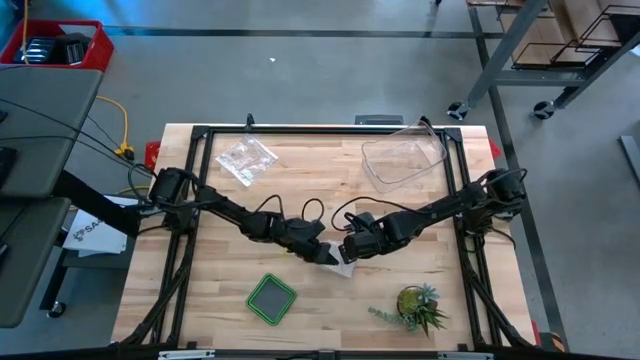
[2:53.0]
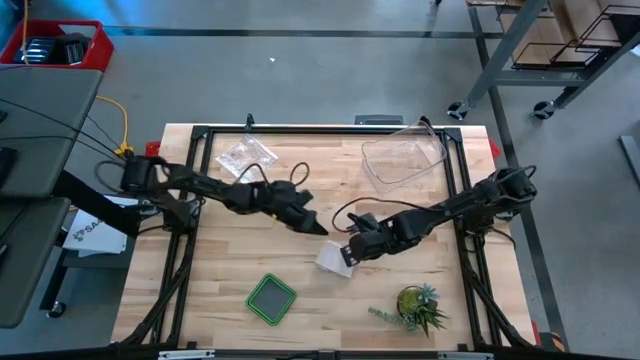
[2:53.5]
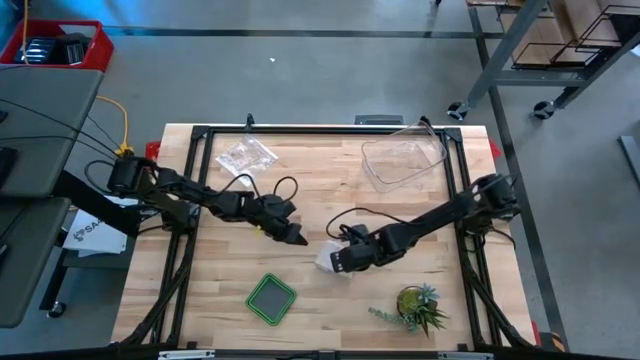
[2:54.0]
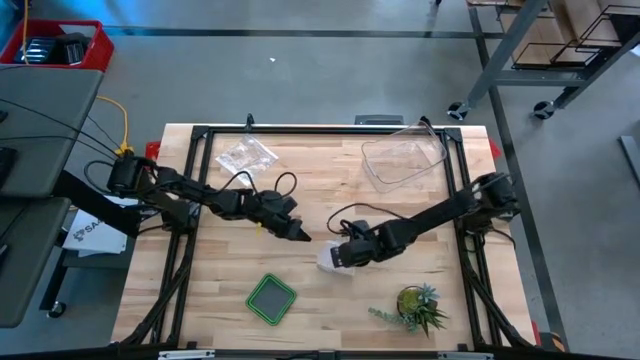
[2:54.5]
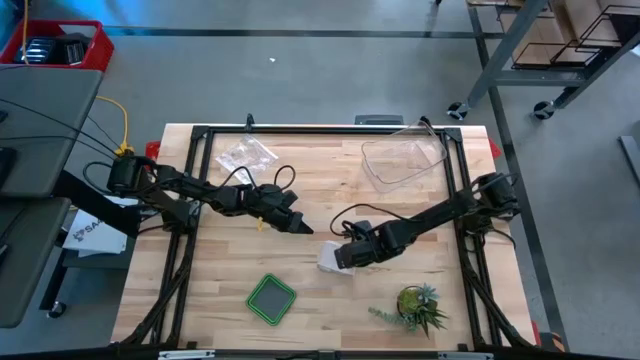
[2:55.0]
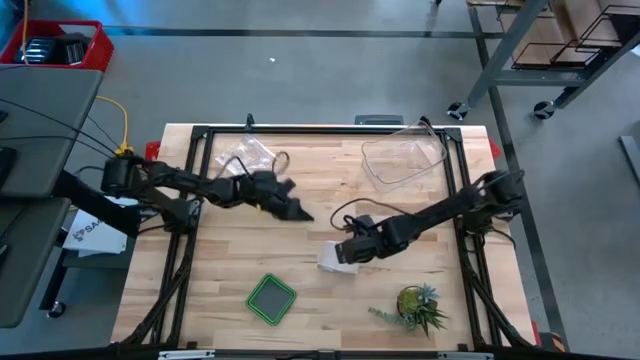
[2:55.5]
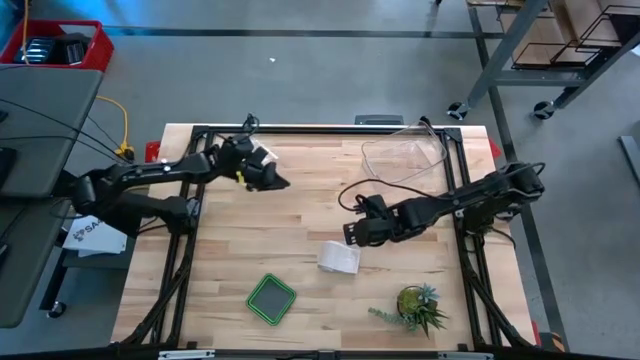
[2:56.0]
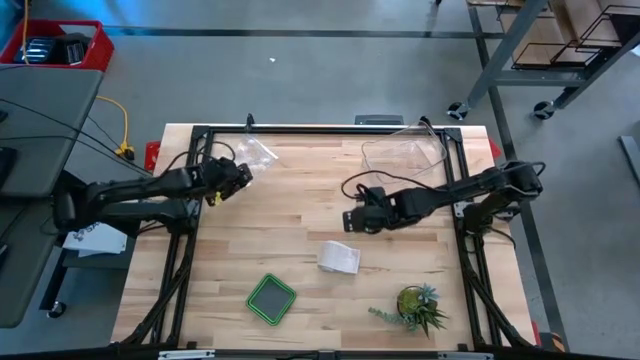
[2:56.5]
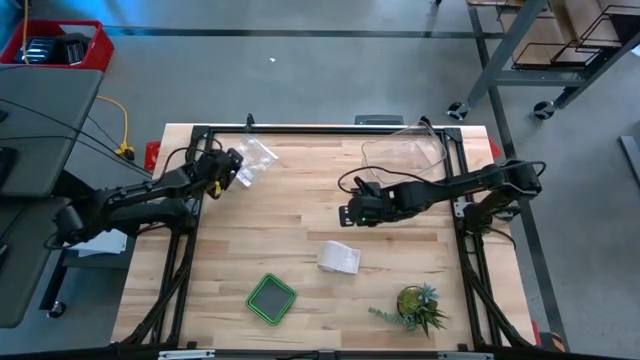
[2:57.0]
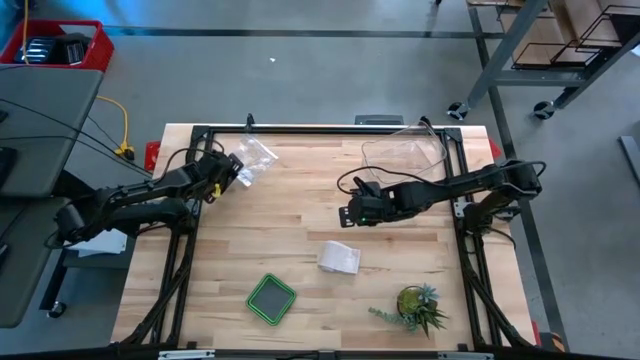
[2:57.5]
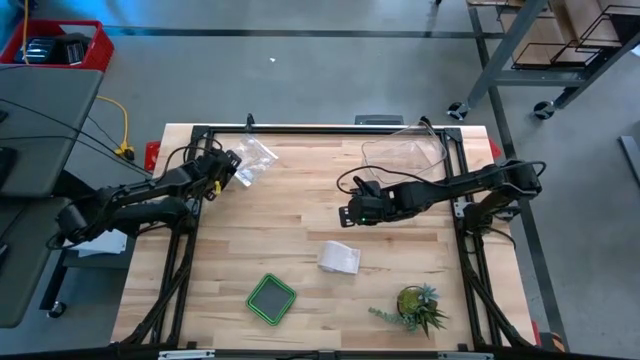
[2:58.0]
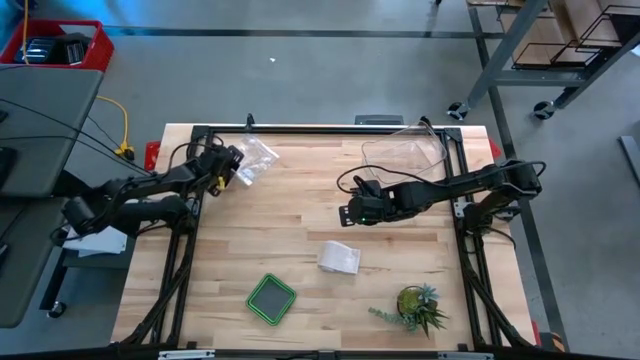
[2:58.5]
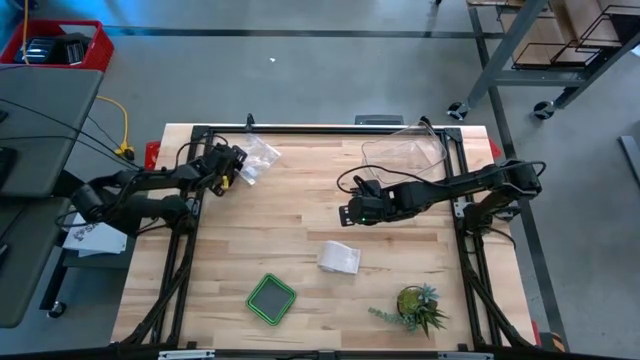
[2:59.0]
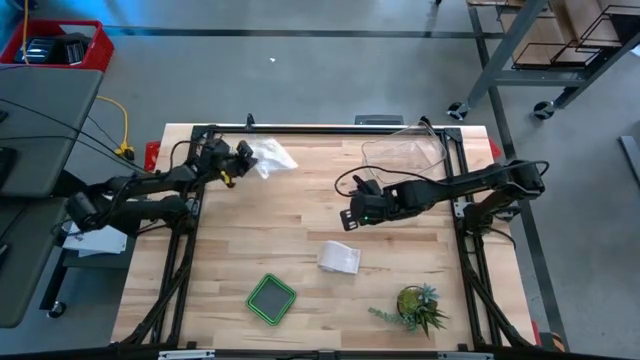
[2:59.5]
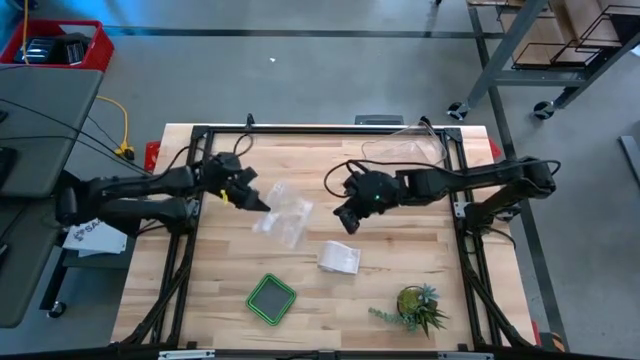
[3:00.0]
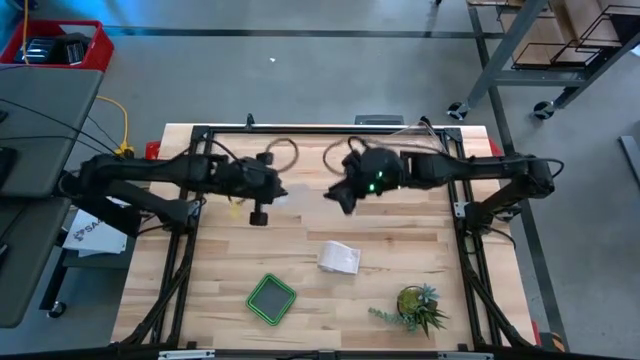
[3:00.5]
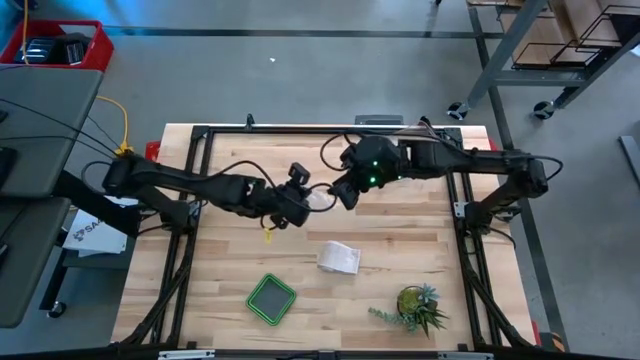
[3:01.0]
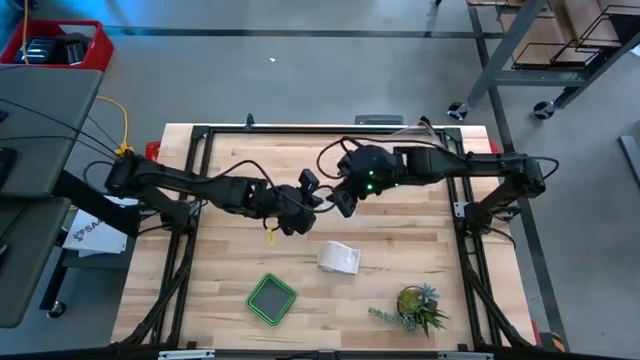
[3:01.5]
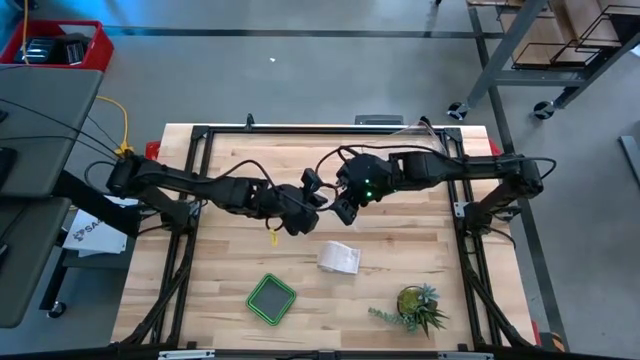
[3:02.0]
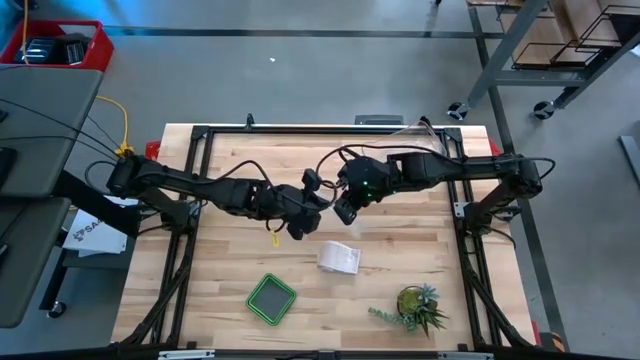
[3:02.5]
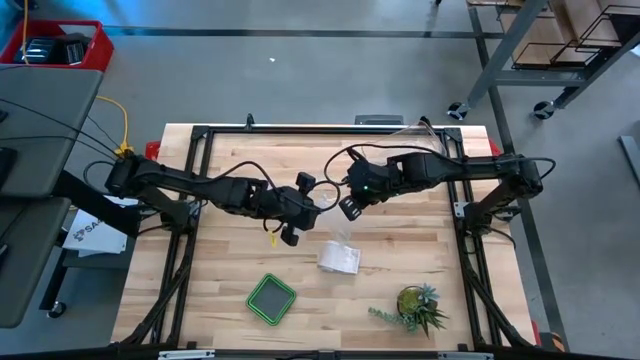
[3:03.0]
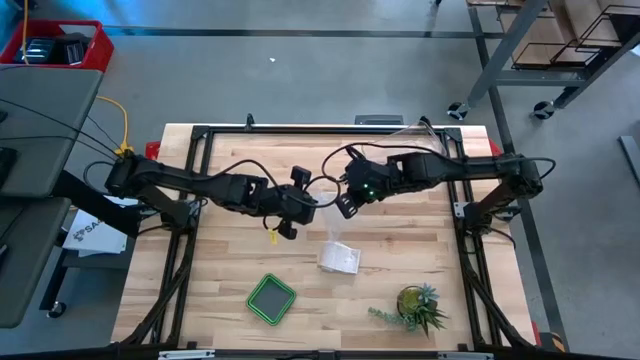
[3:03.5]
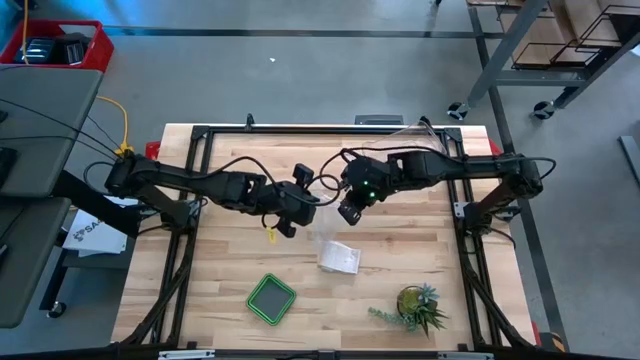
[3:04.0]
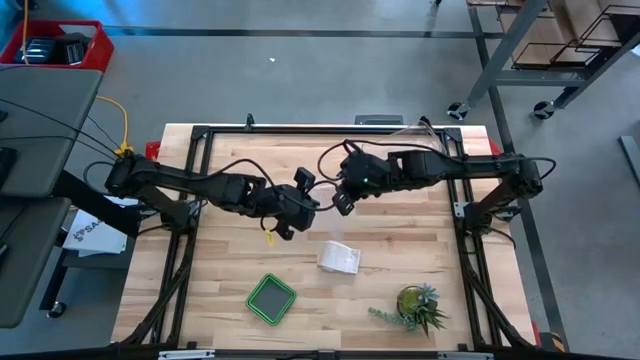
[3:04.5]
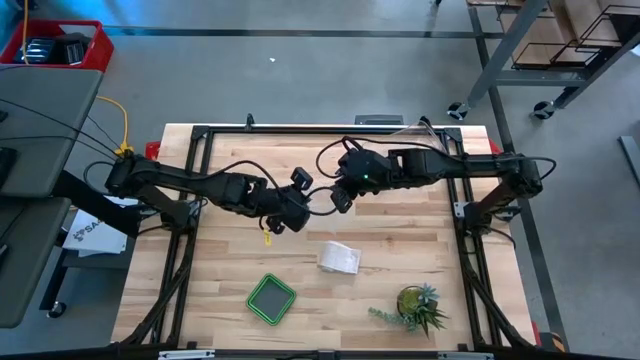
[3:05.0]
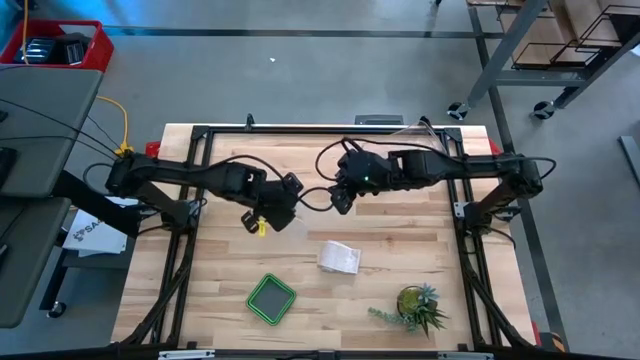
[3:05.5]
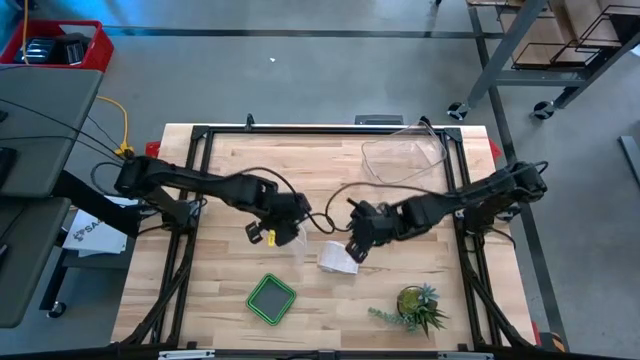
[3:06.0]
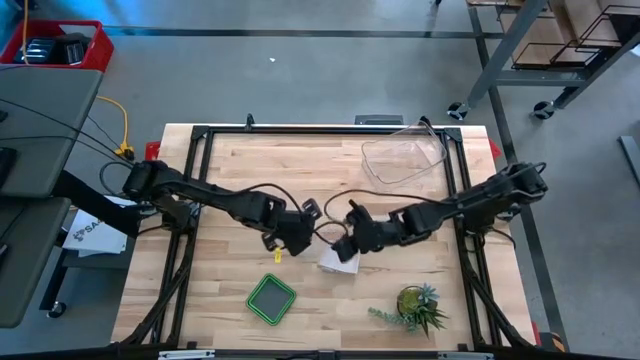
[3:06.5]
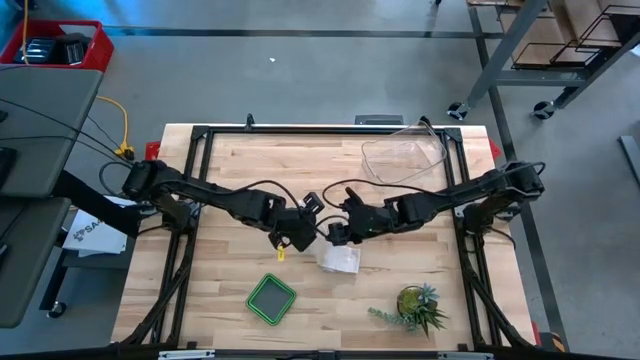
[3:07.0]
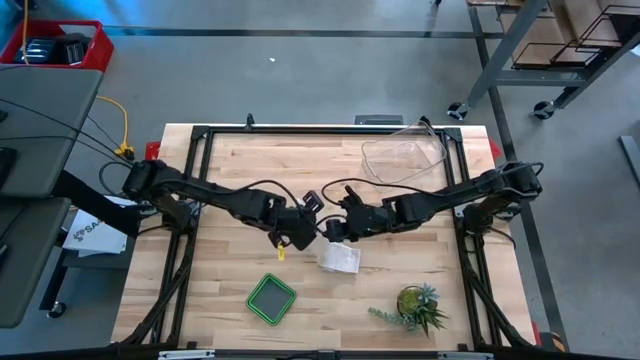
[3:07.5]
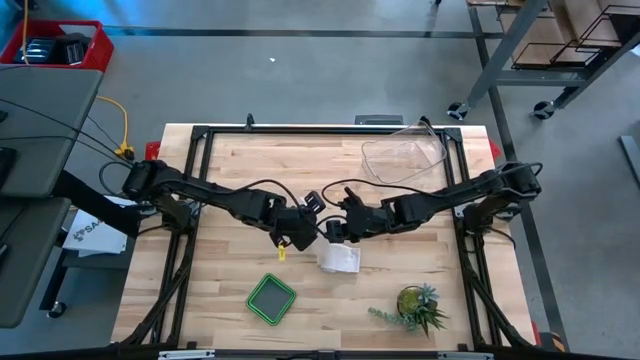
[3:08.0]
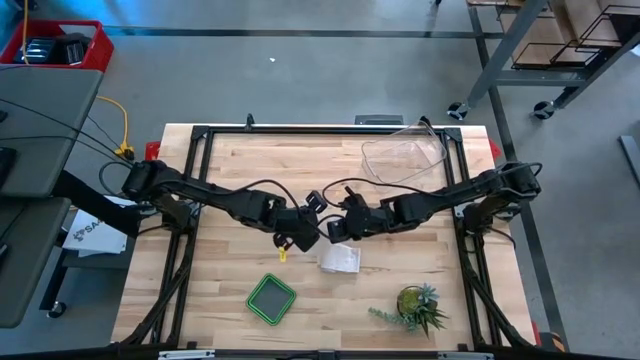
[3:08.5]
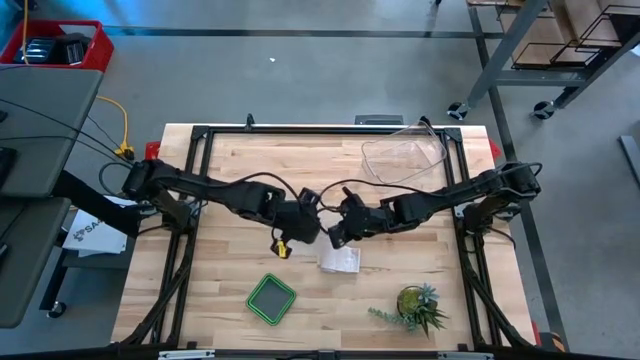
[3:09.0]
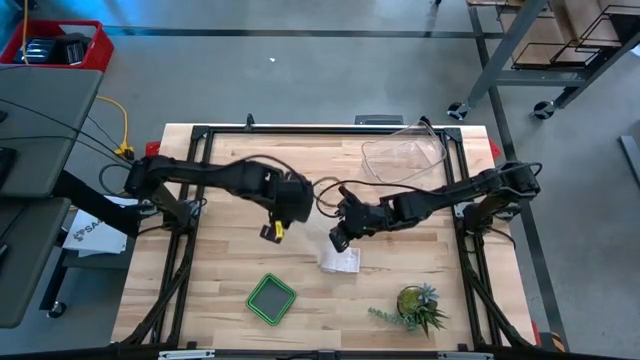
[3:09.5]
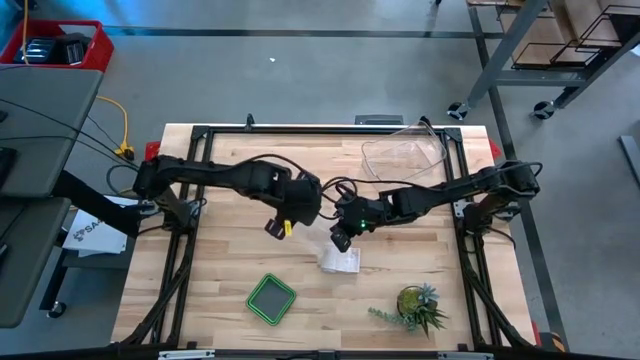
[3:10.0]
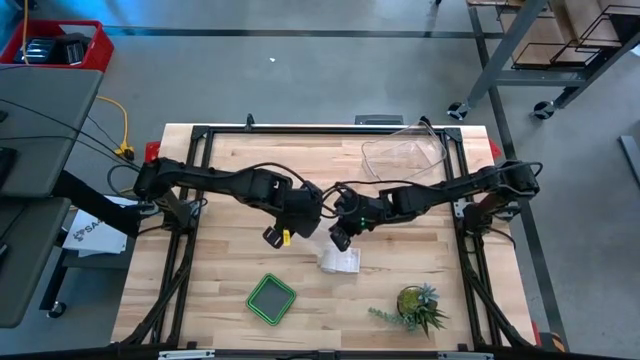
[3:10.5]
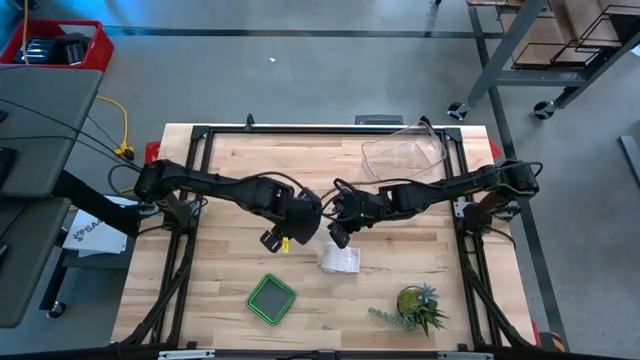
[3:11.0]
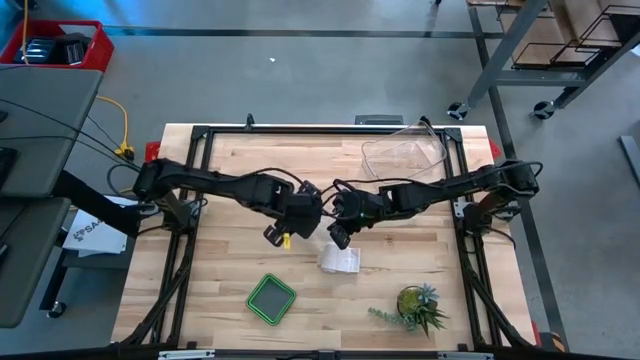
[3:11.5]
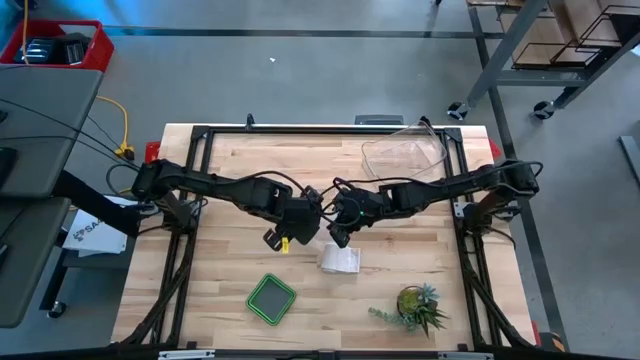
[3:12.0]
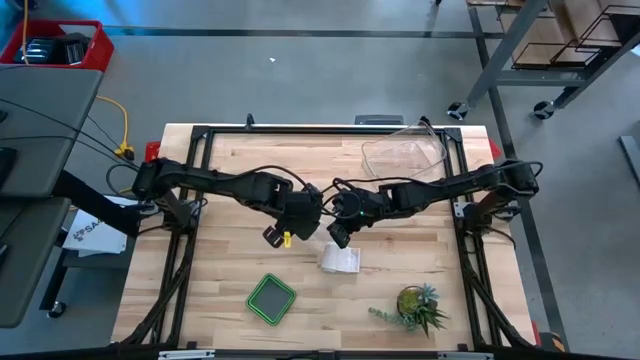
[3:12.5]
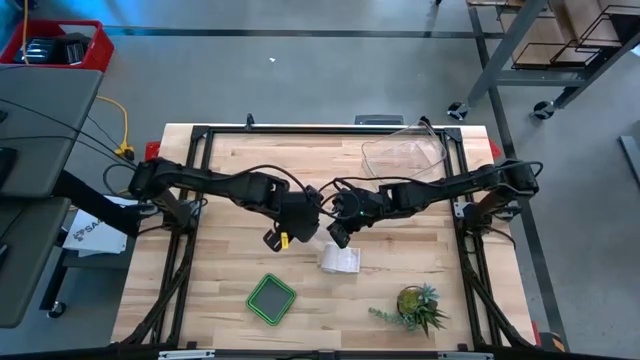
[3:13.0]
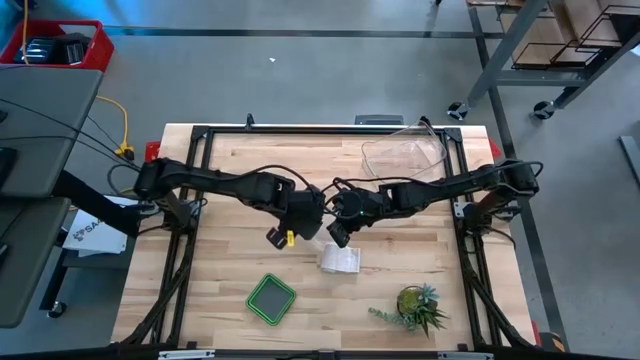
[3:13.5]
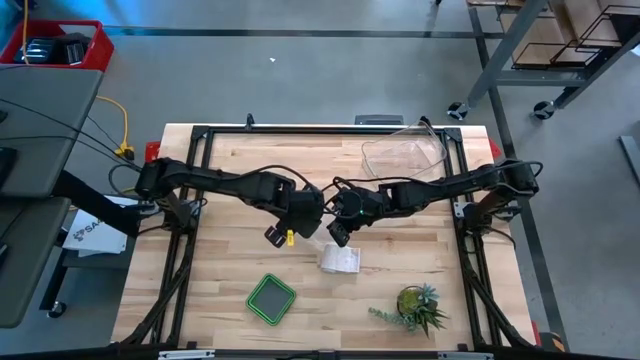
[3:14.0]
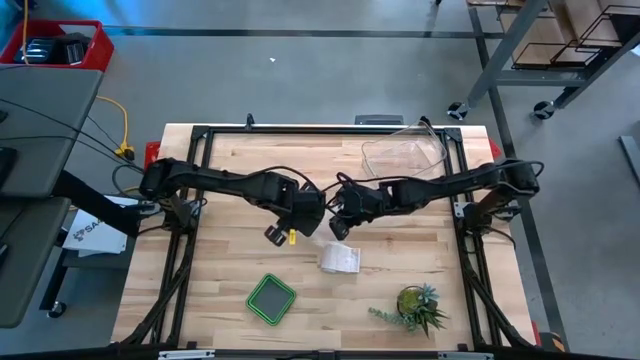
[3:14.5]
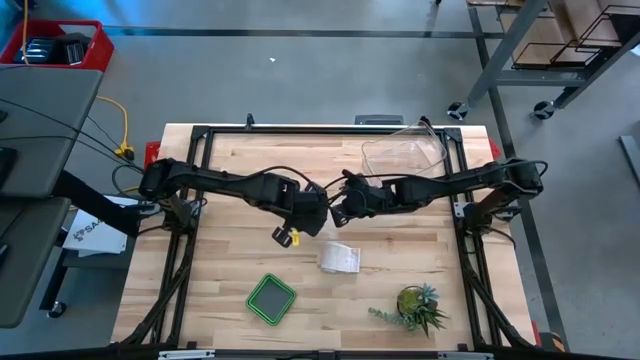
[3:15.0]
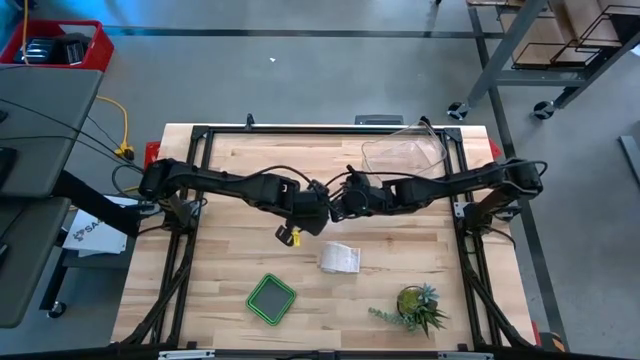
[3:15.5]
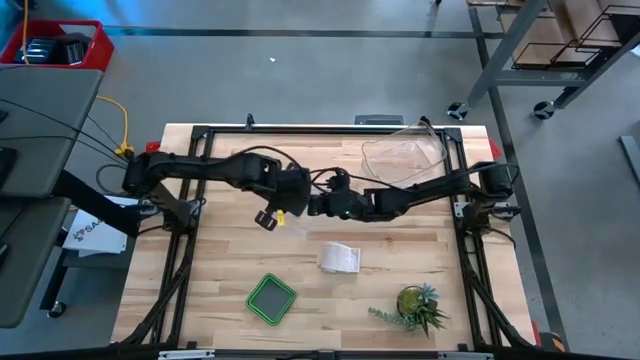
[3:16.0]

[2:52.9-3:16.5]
Task: Roll bandage
Put the rolled white bandage into the transparent zip bag
